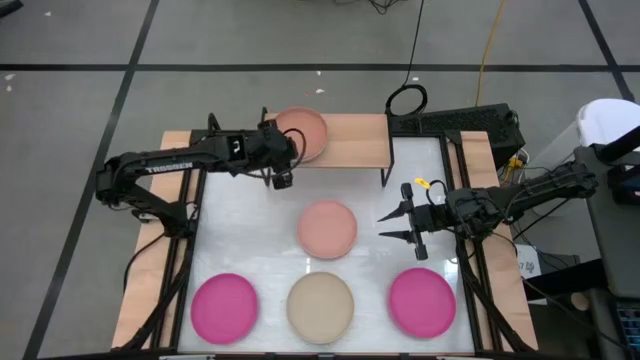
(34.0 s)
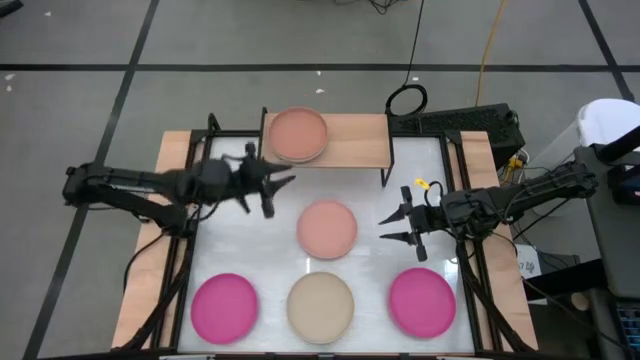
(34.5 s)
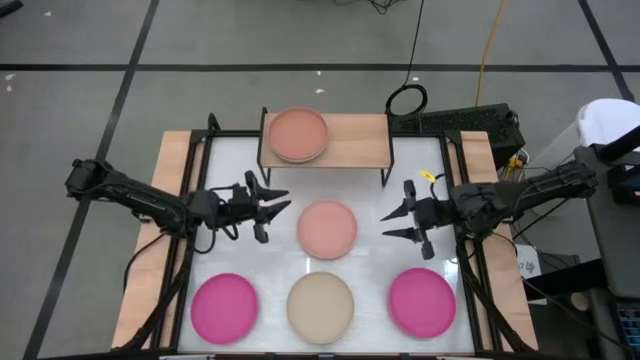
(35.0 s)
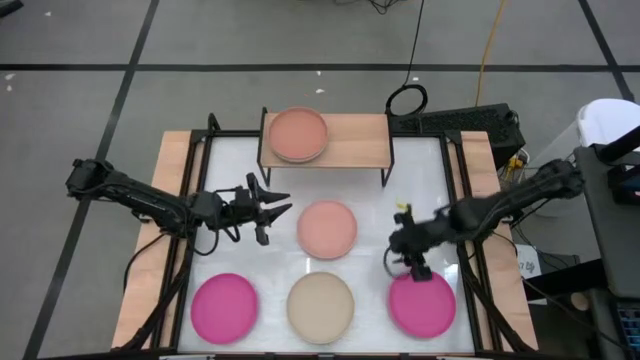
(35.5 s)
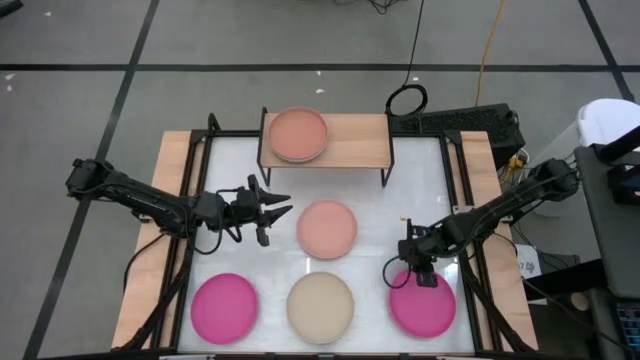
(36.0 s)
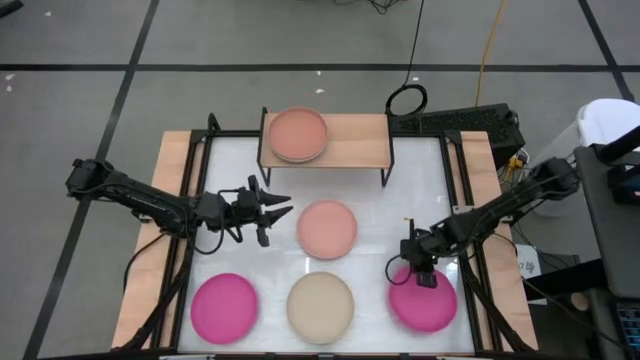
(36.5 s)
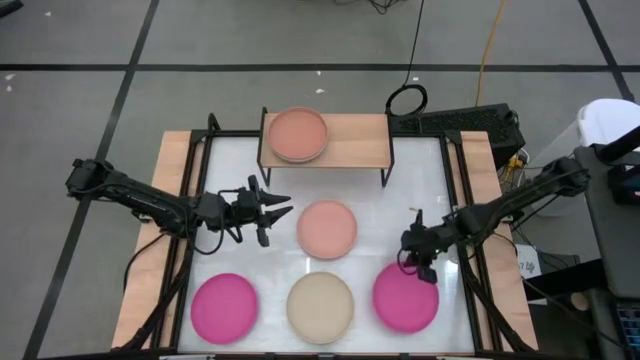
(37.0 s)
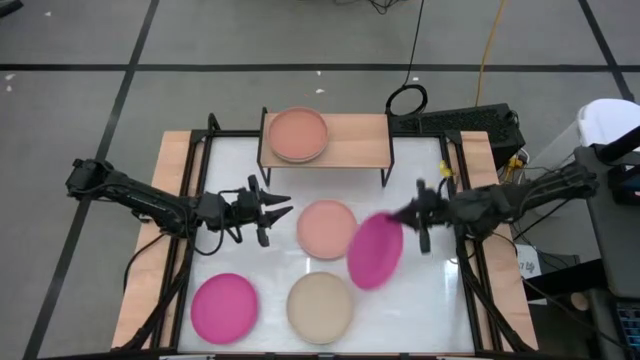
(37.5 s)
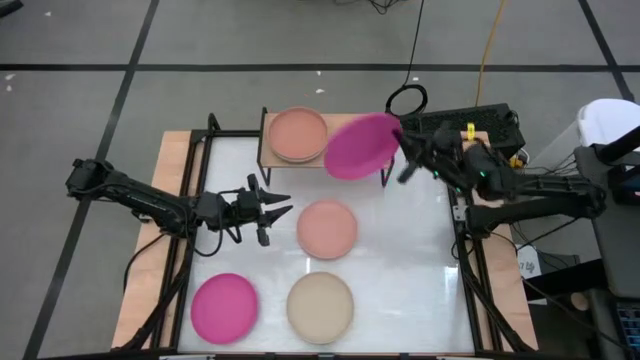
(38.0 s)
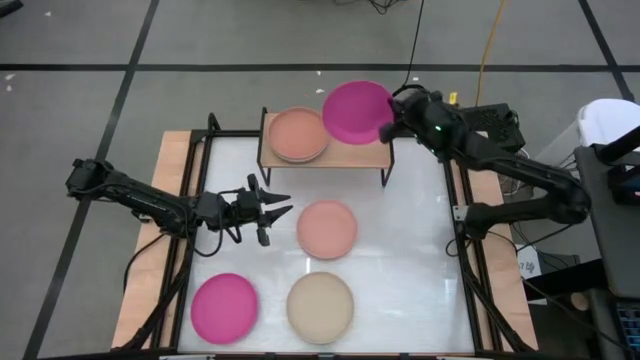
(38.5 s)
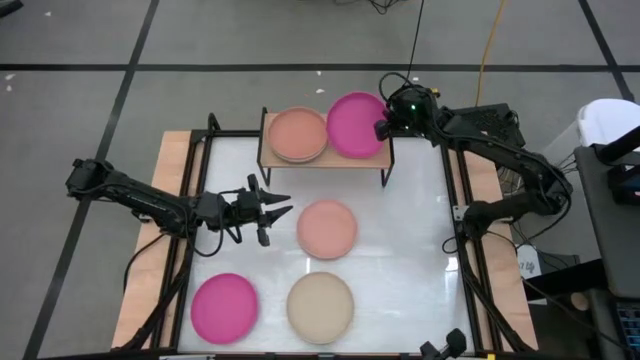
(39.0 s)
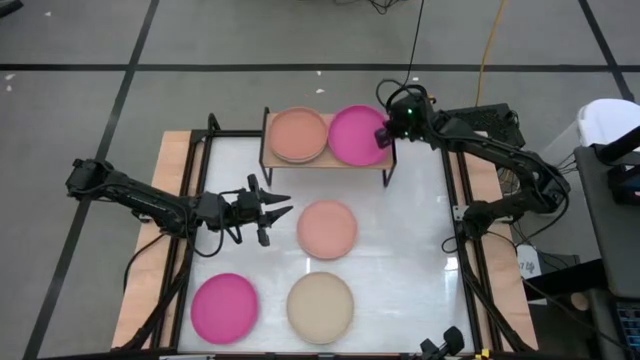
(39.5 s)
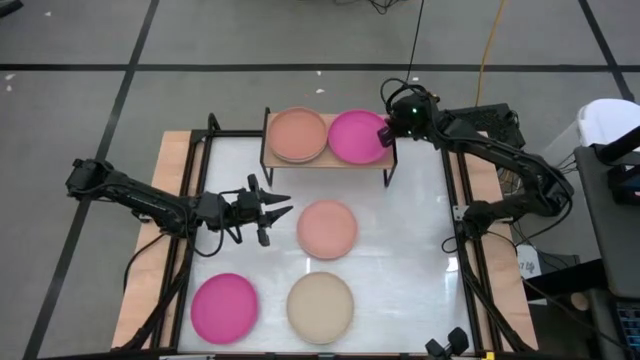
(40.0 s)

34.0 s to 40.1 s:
Task: Place and stack plates onto a shelf
Put the right pink on the shelf

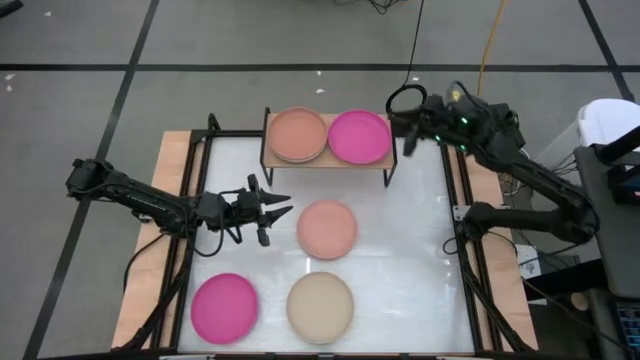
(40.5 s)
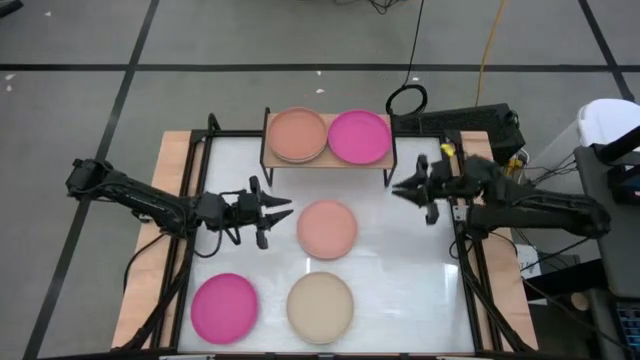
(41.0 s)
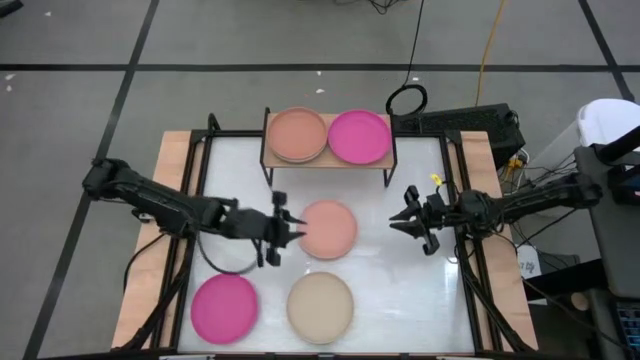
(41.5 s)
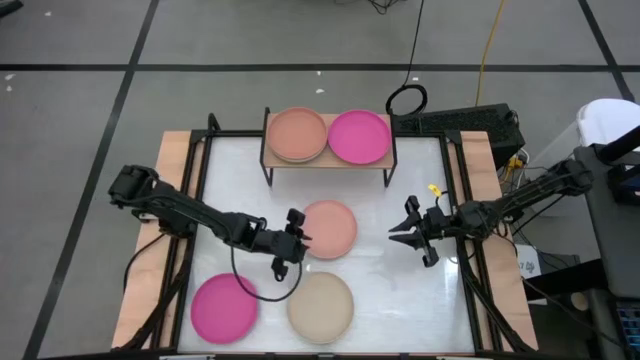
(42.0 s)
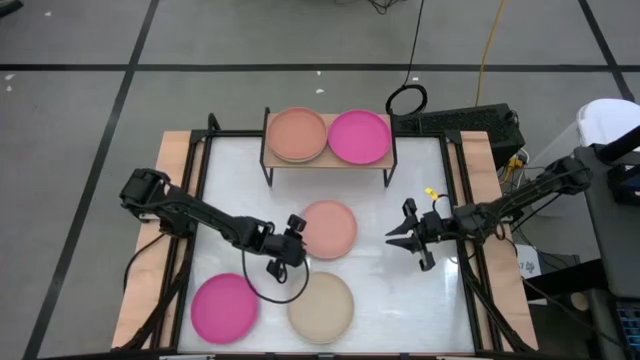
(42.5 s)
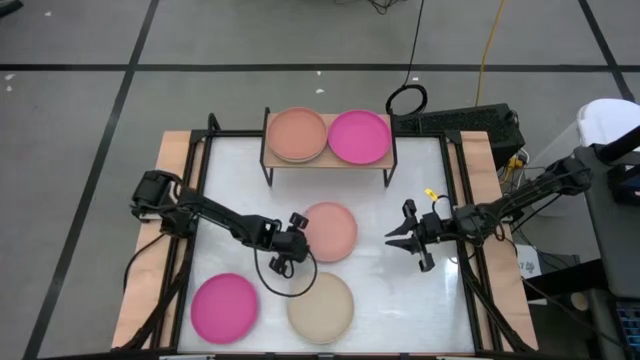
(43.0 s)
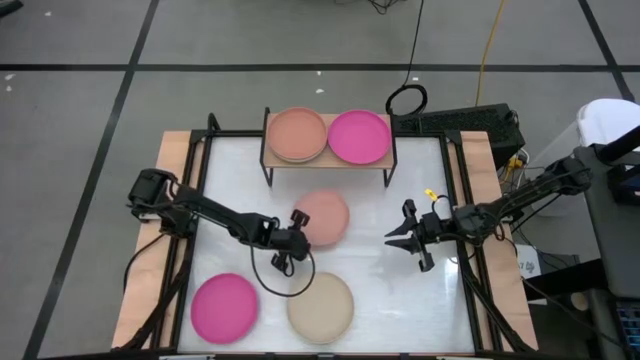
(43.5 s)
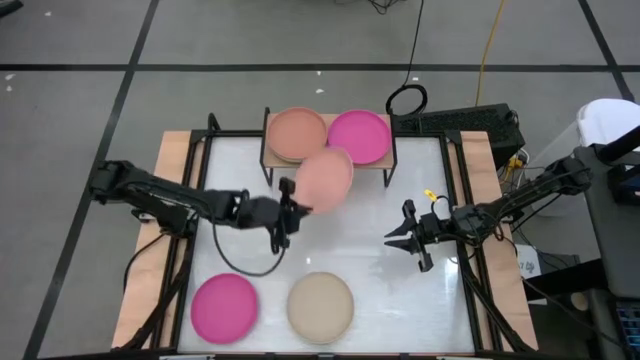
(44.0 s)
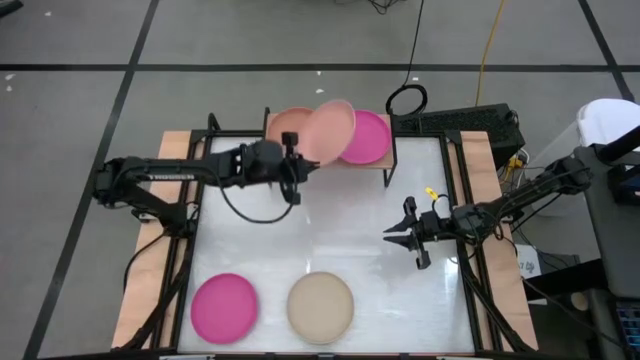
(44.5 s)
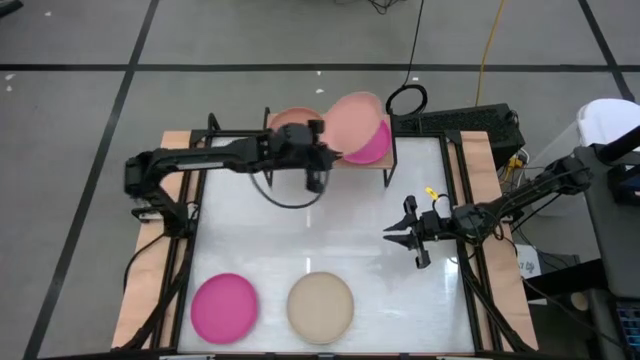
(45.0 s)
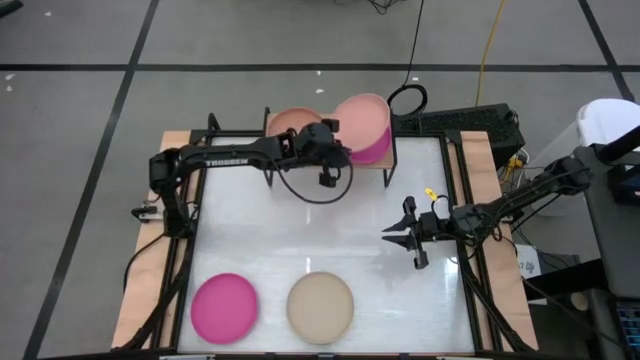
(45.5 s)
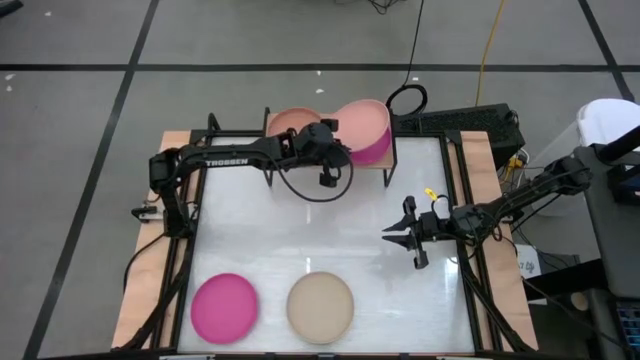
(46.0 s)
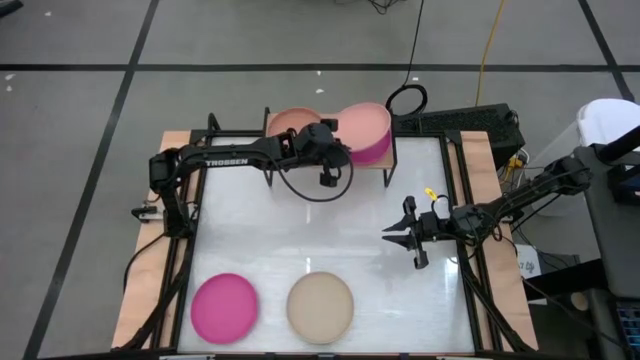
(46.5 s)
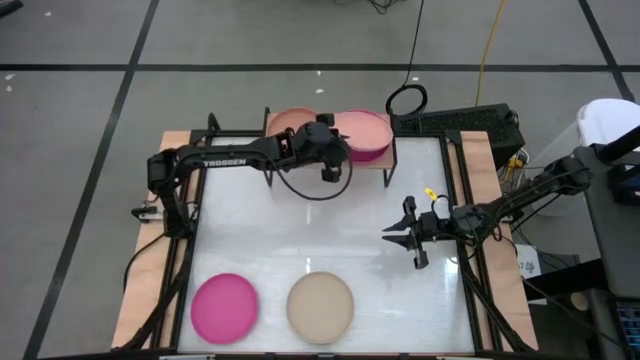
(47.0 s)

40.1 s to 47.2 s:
Stack the orange plate on top of the pink plate on the shelf

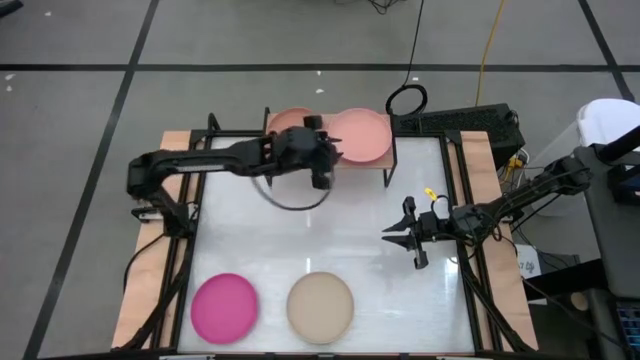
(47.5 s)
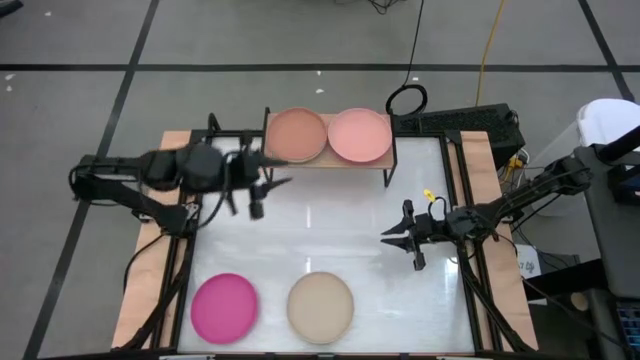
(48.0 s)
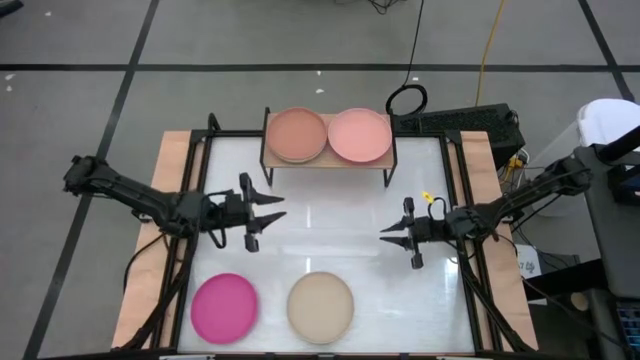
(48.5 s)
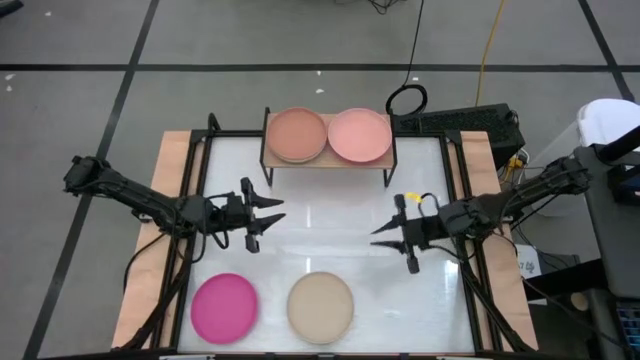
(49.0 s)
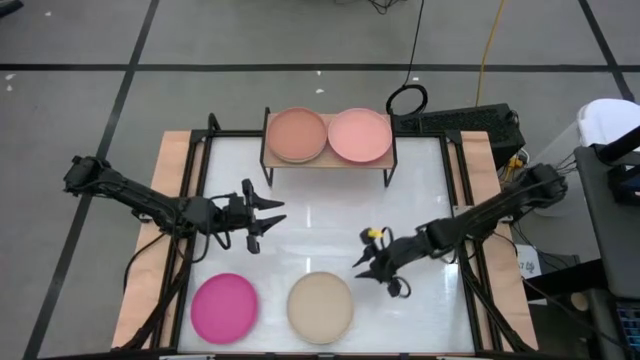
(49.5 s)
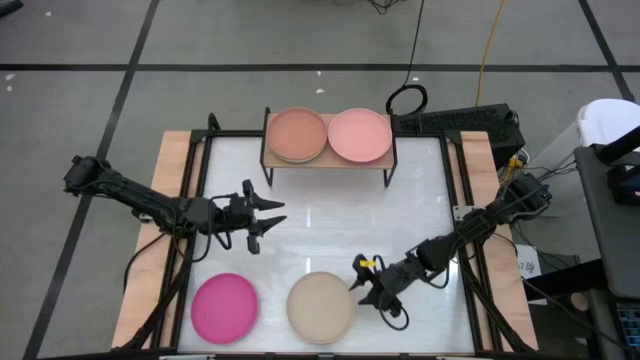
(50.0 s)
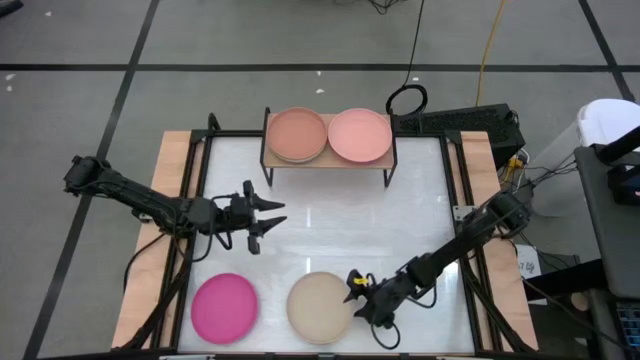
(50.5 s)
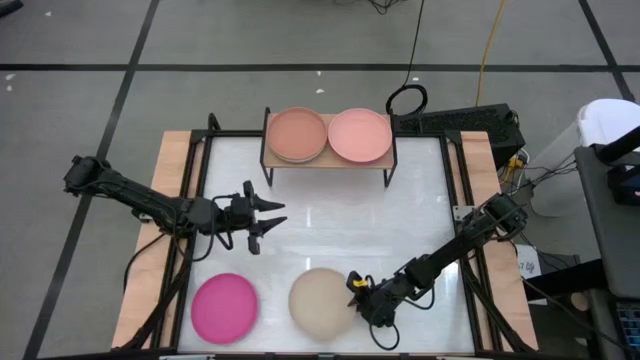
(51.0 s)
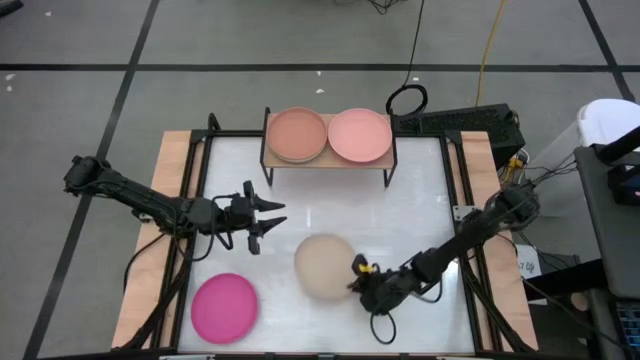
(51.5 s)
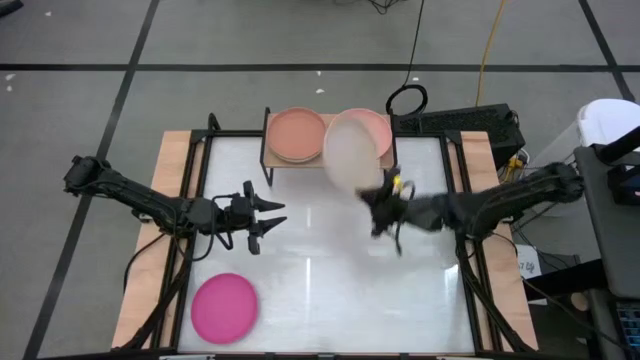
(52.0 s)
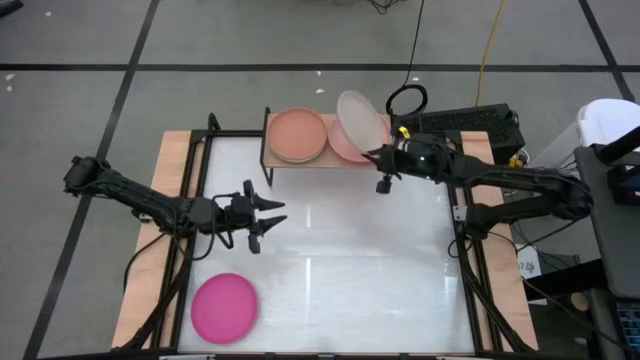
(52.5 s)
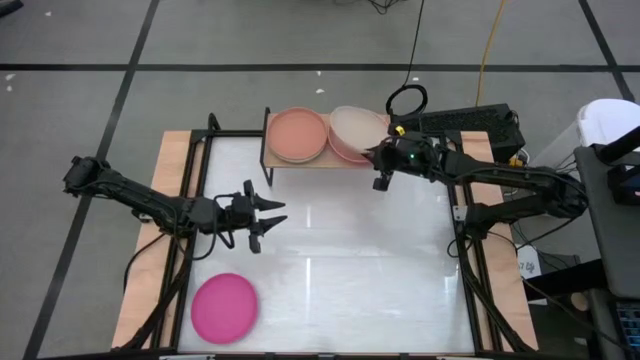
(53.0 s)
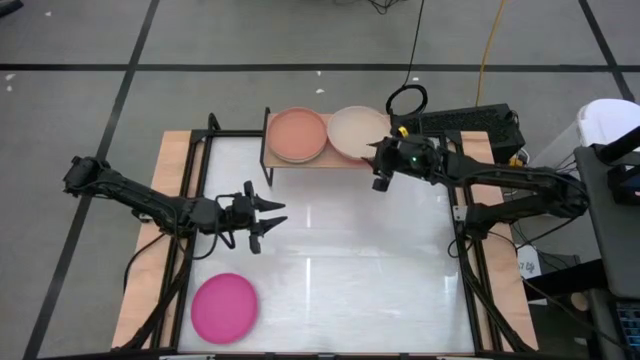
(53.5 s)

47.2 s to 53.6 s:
Stack the brown plate on top of the orange plate on the shelf

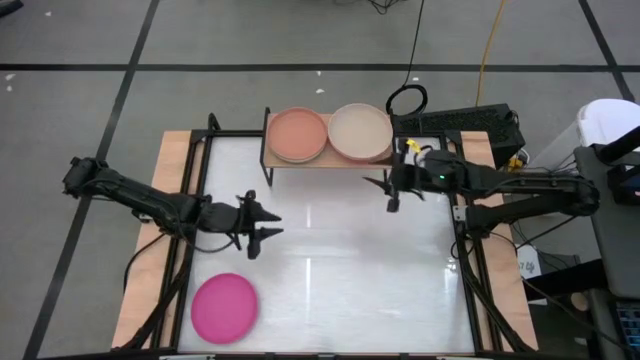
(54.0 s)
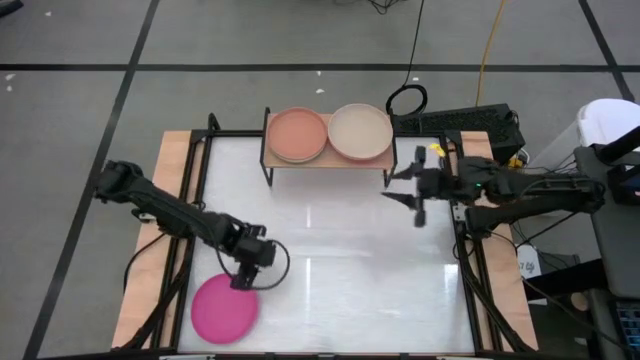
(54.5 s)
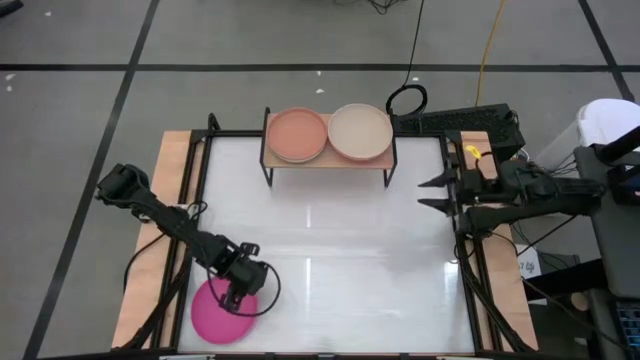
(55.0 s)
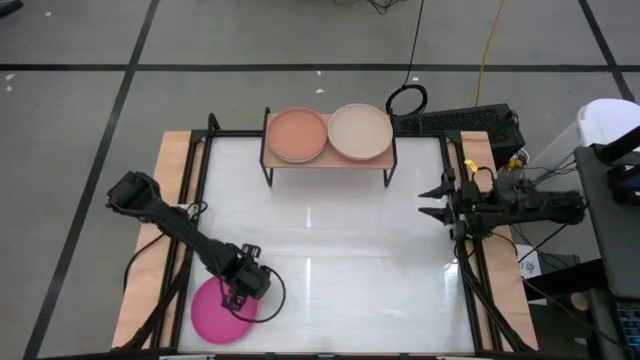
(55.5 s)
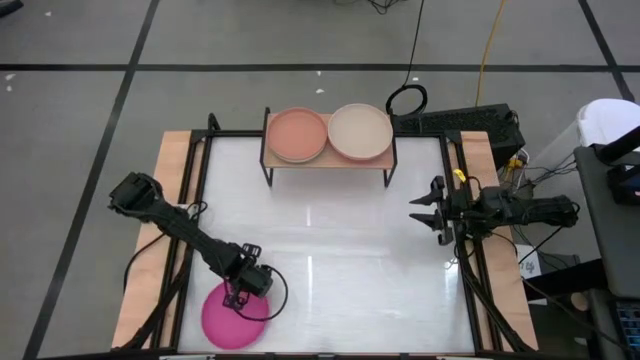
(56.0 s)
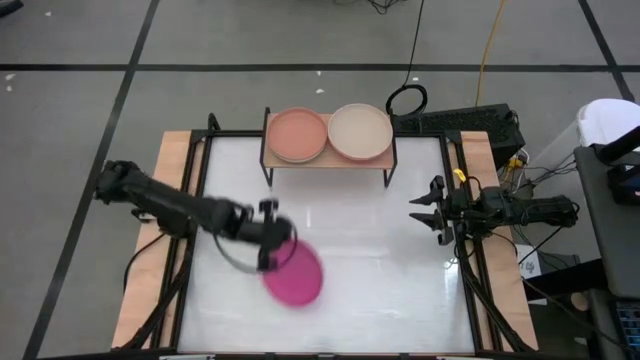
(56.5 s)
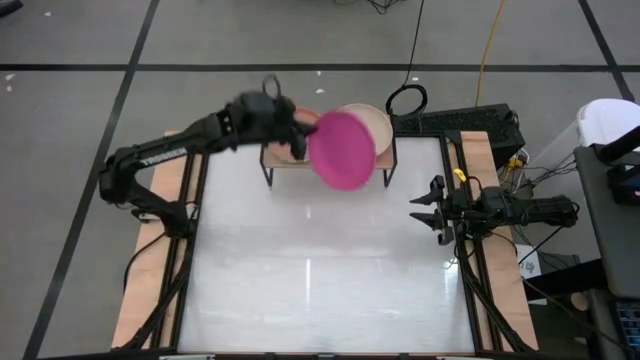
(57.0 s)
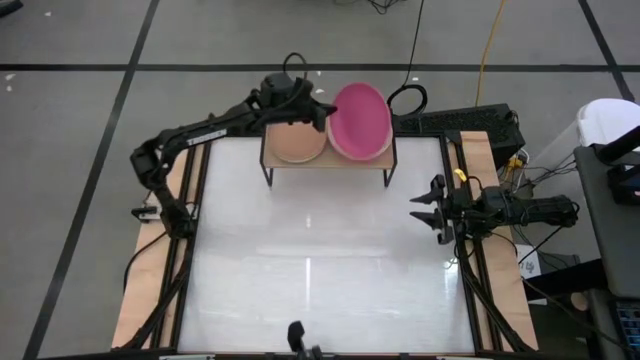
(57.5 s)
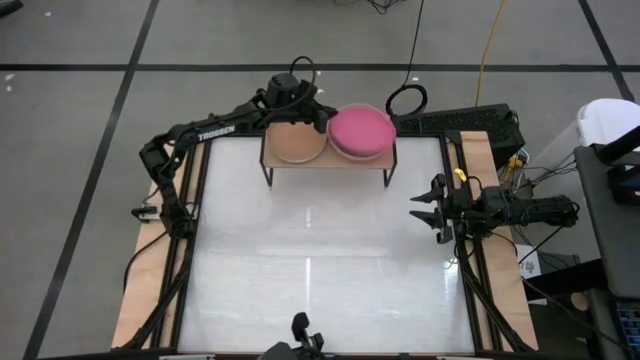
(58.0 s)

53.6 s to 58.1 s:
Stack the pink plate on top of the white brown on the shelf
